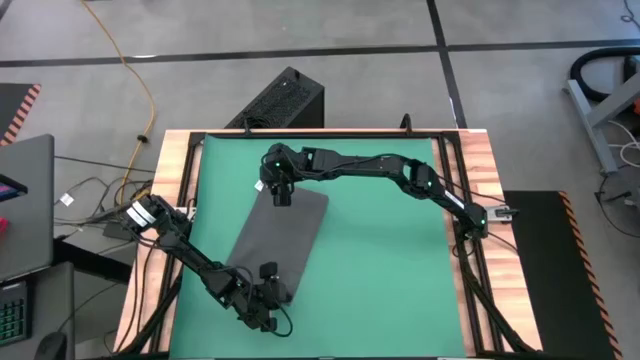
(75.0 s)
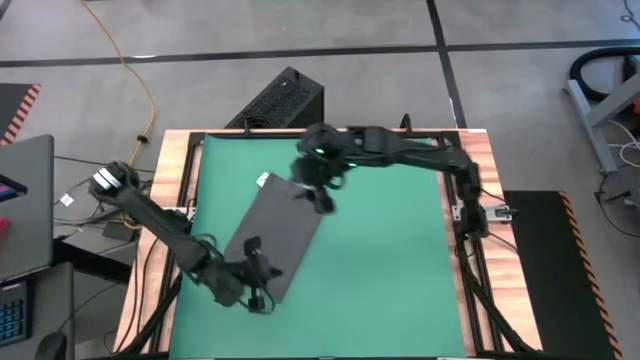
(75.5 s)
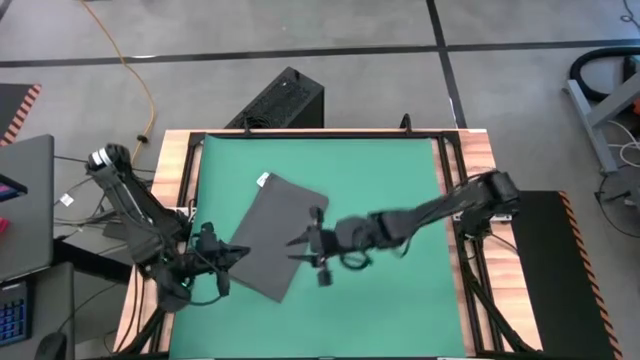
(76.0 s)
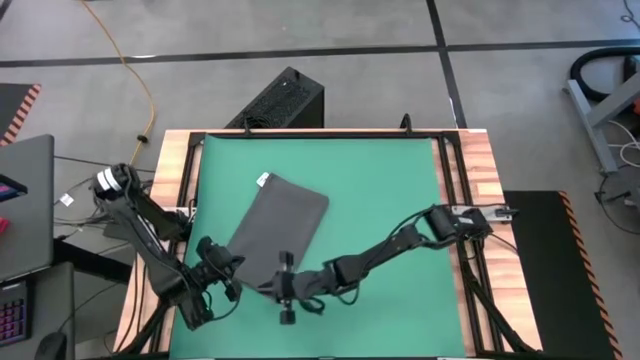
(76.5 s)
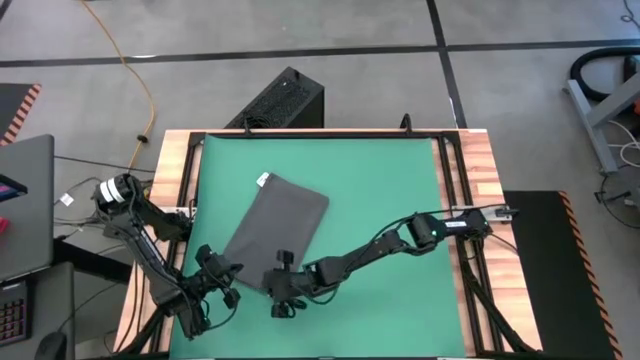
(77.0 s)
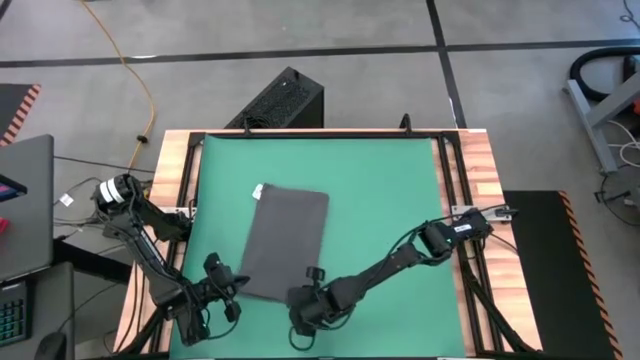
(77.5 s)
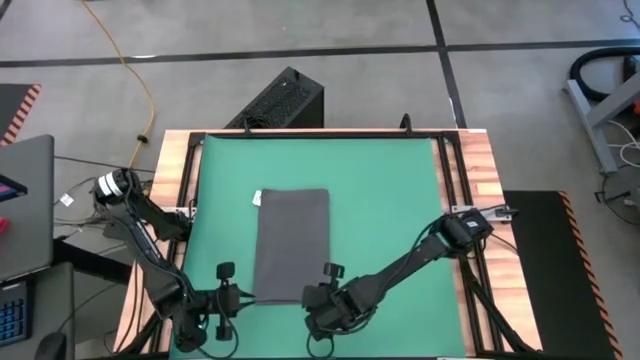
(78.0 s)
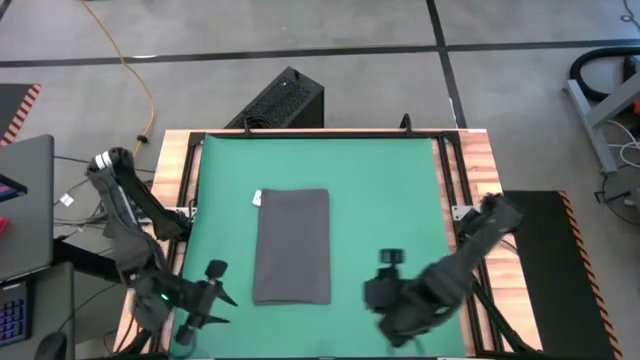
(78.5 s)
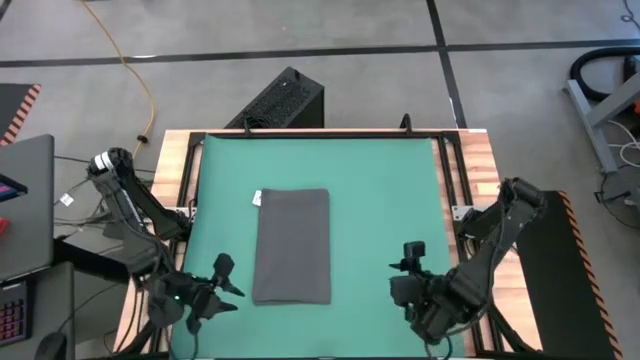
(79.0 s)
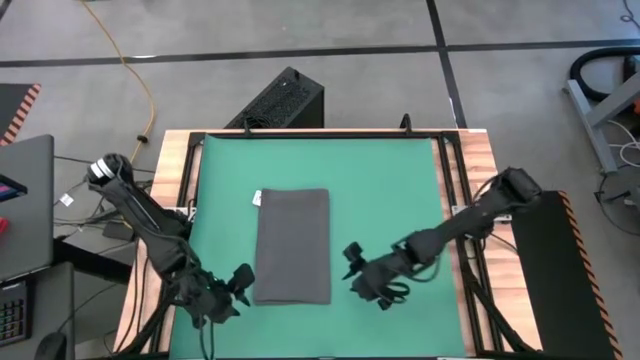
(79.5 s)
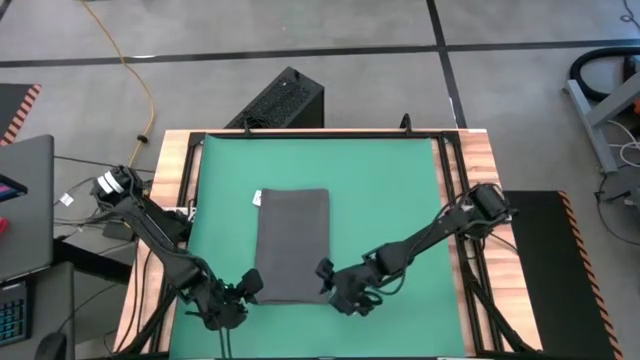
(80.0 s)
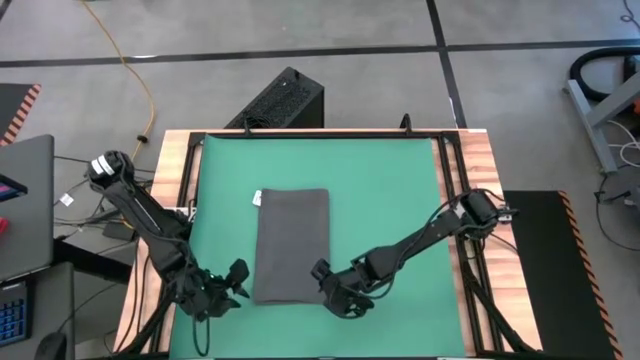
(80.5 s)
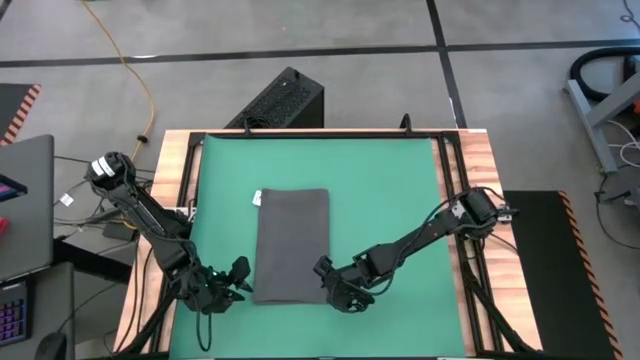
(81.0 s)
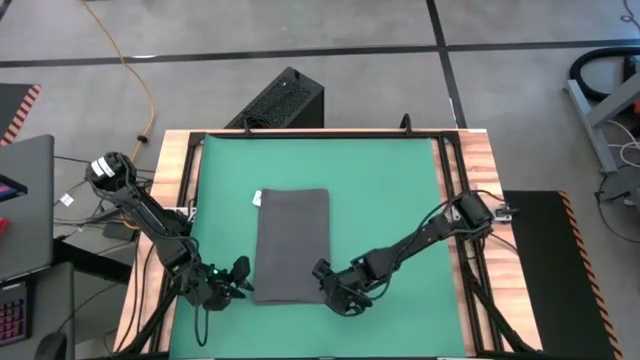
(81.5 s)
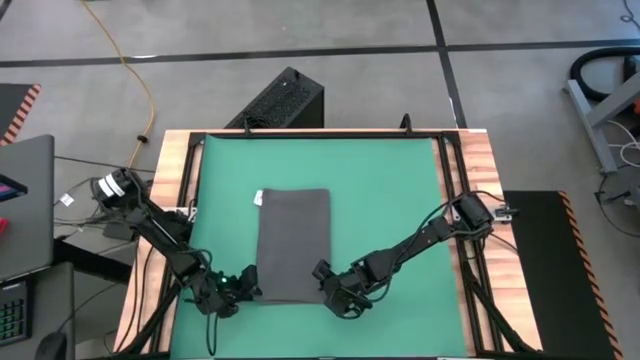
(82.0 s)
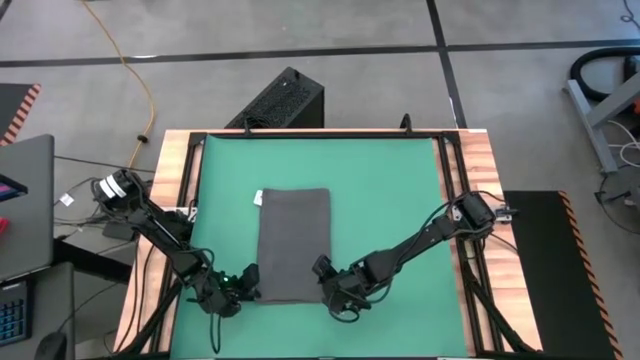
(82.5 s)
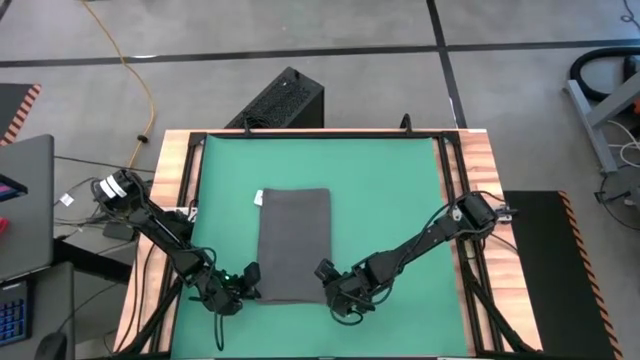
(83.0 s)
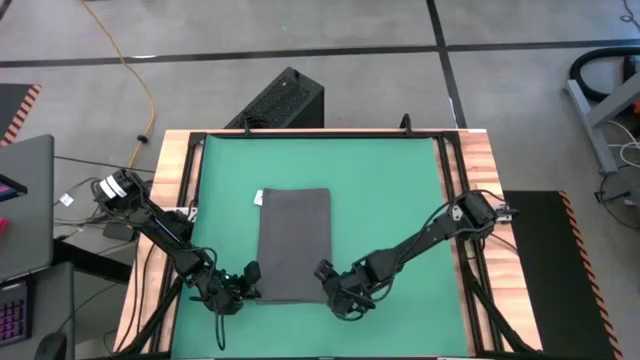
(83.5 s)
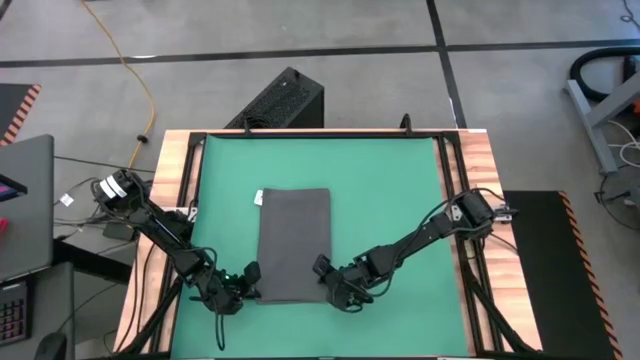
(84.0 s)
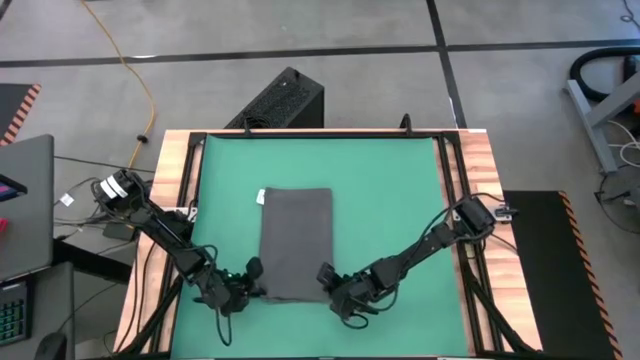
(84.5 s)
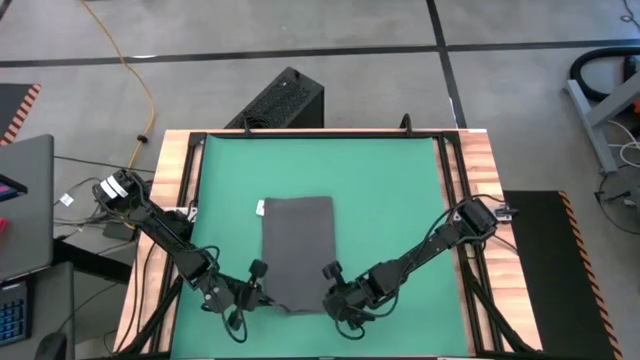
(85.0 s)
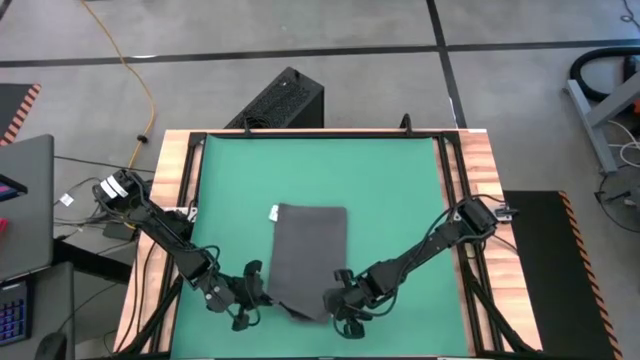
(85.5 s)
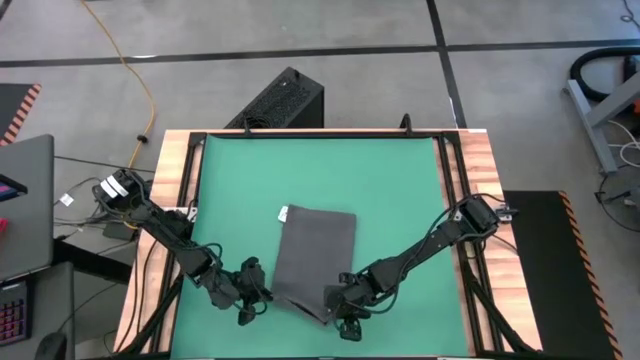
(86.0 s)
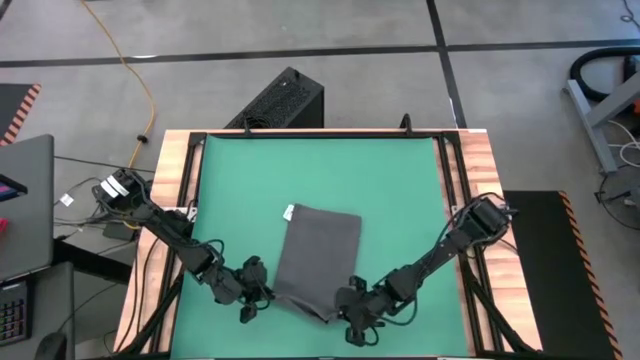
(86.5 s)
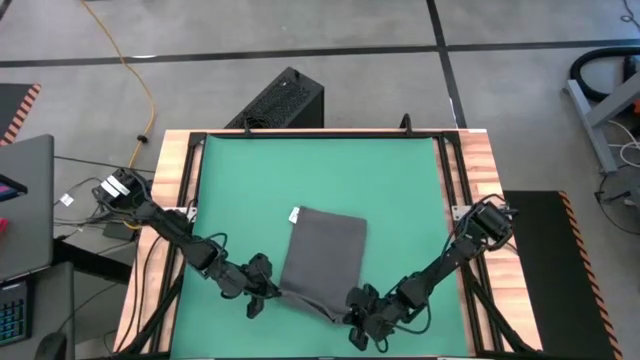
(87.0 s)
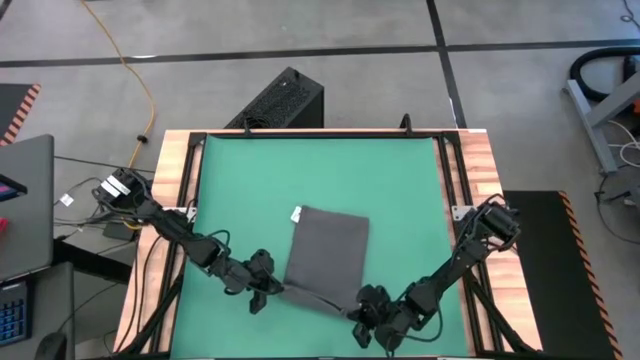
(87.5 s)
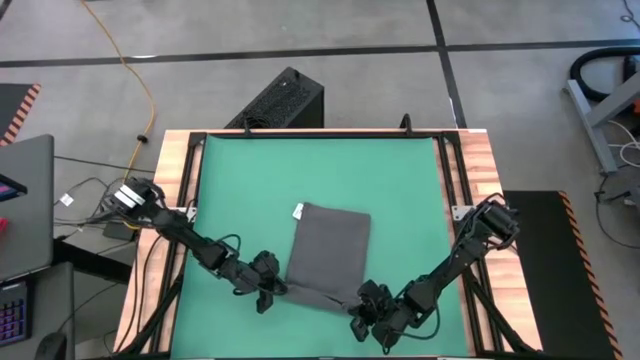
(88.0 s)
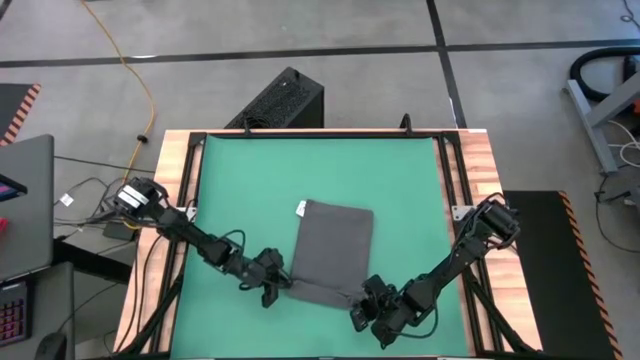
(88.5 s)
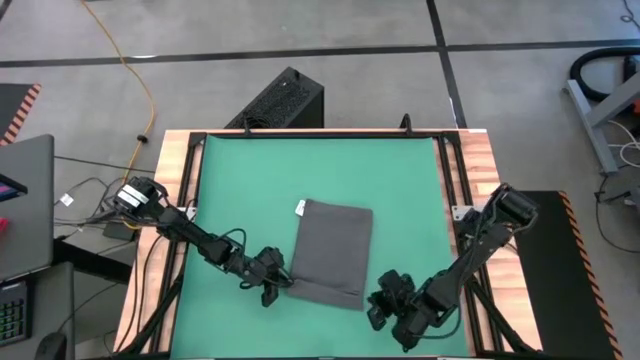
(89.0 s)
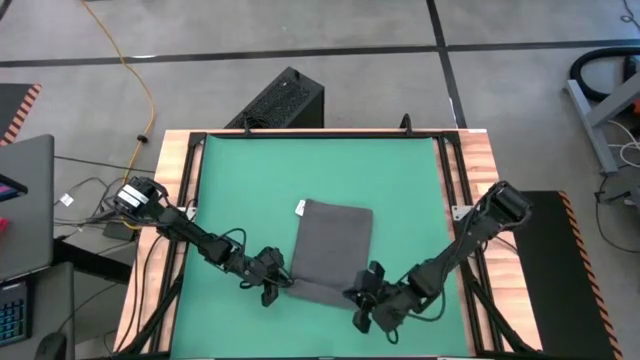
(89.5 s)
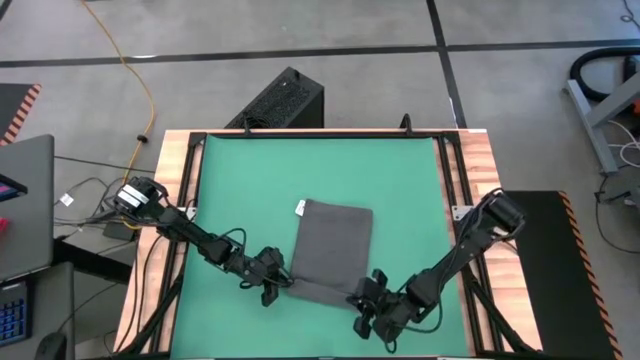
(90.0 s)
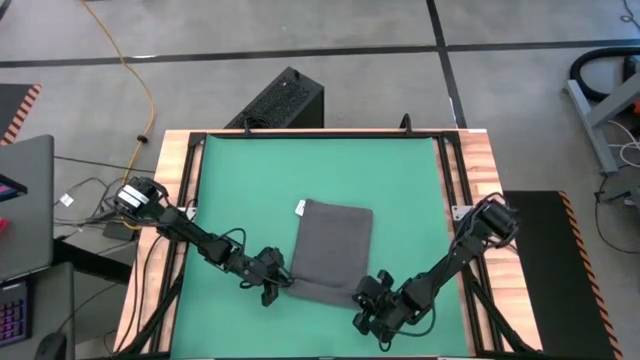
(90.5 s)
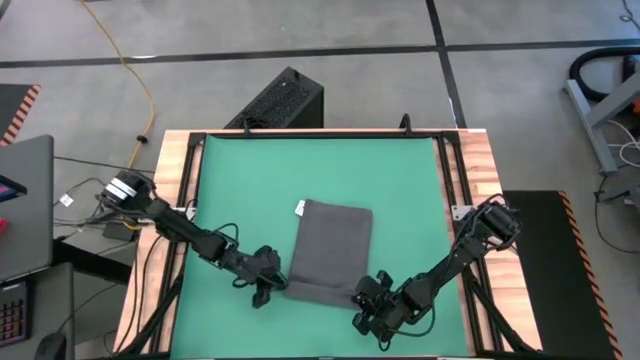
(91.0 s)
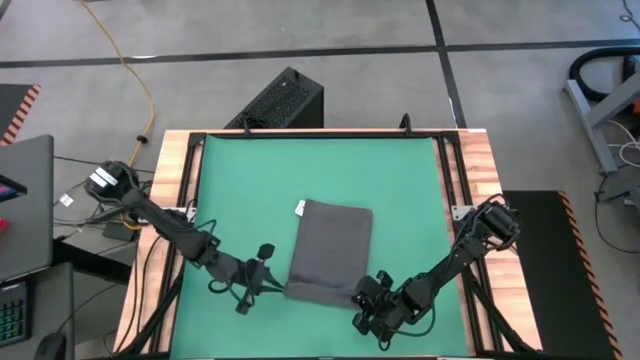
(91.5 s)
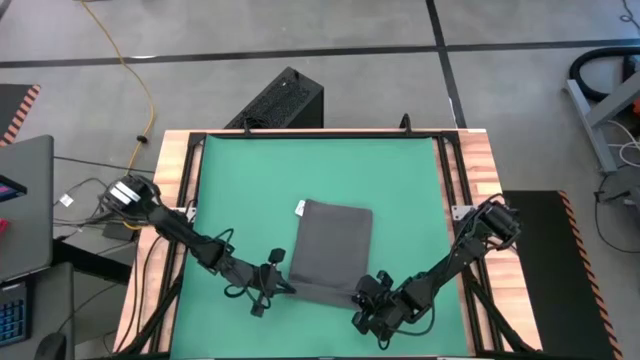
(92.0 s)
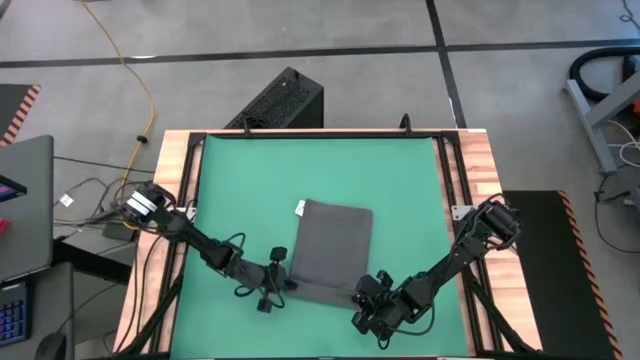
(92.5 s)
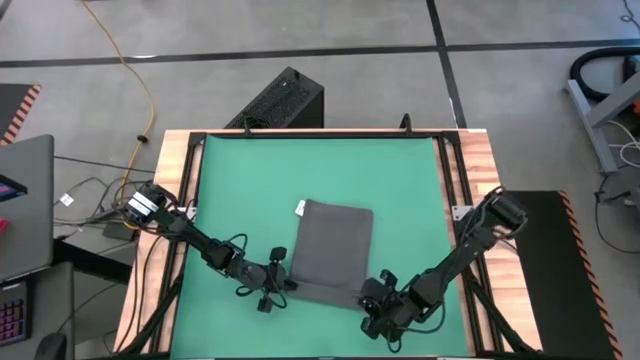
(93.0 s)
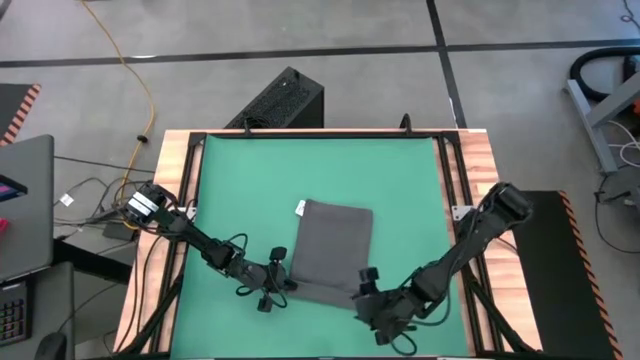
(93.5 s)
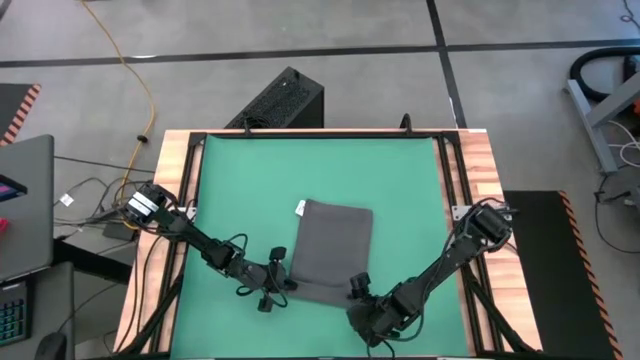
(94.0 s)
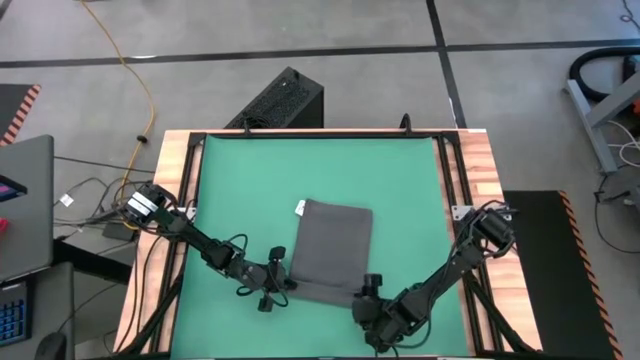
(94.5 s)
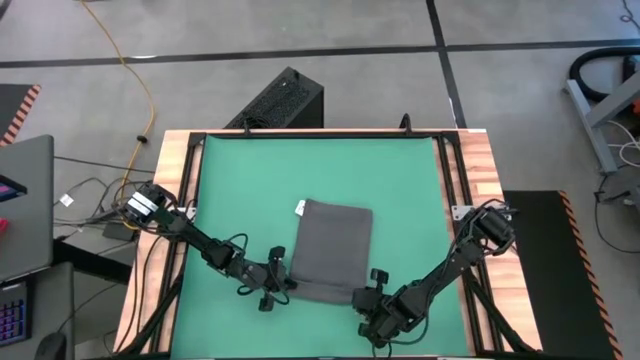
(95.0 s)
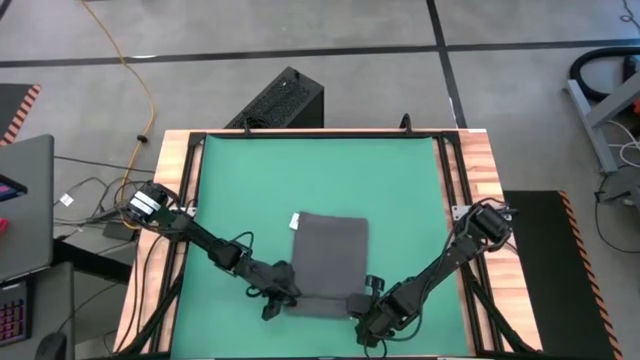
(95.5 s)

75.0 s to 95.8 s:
Task: Roll towel
Roll the gray towel
